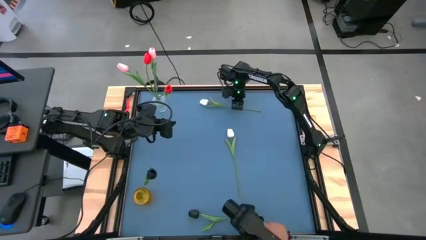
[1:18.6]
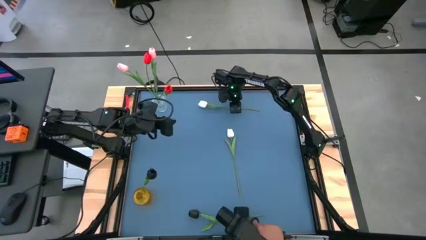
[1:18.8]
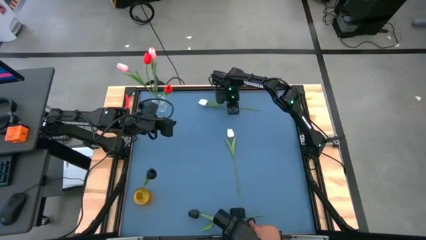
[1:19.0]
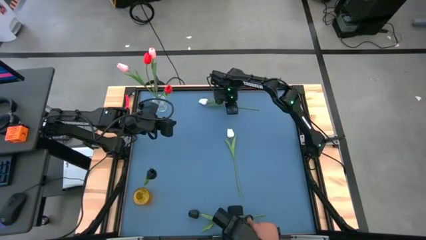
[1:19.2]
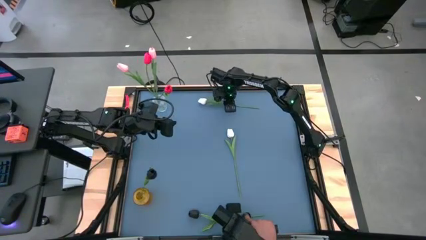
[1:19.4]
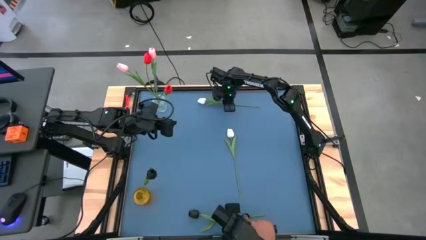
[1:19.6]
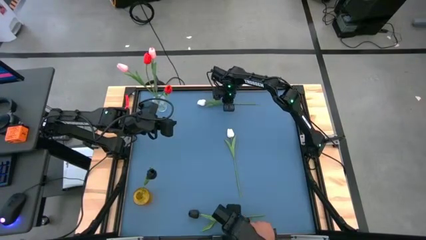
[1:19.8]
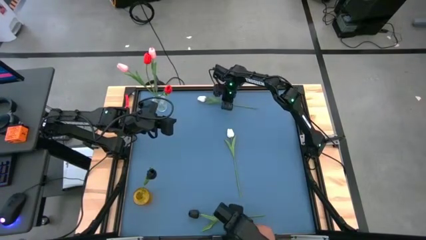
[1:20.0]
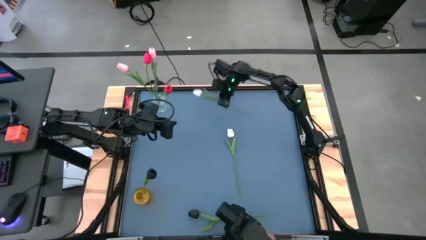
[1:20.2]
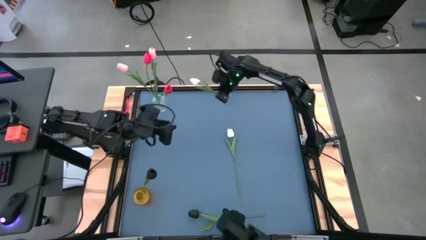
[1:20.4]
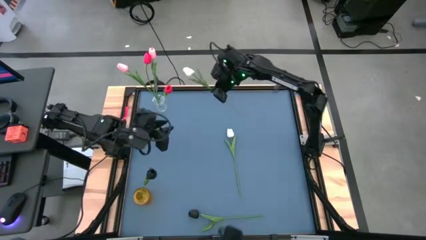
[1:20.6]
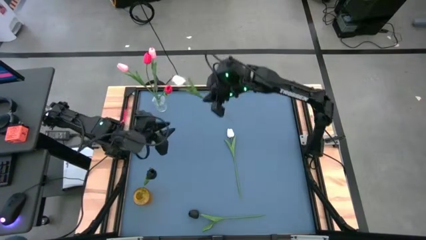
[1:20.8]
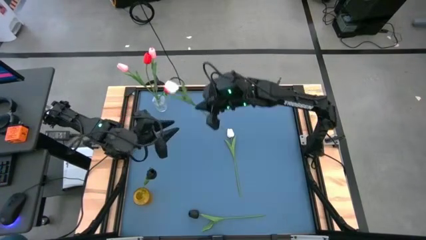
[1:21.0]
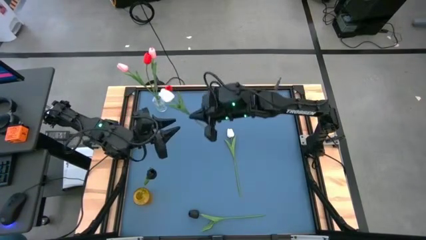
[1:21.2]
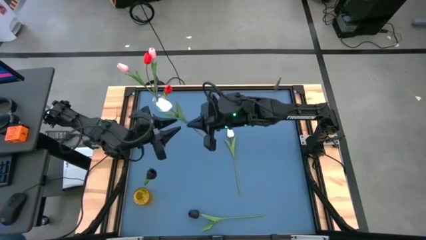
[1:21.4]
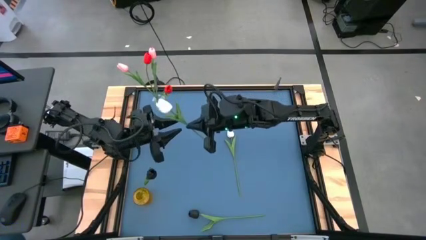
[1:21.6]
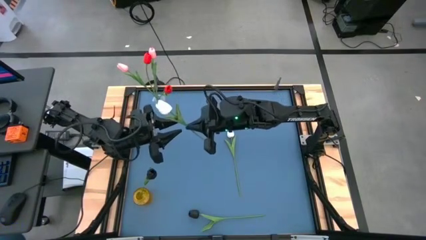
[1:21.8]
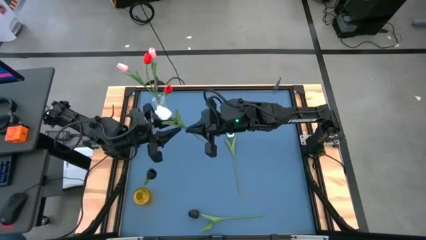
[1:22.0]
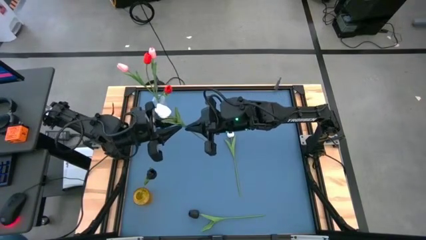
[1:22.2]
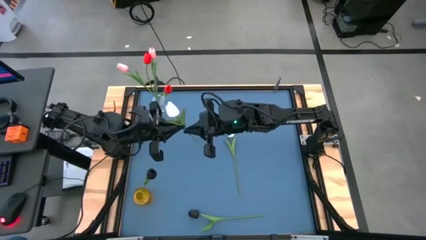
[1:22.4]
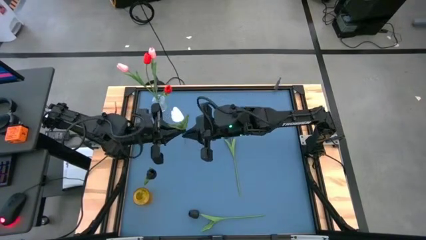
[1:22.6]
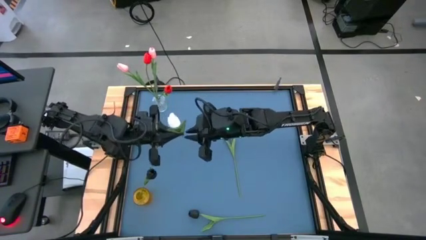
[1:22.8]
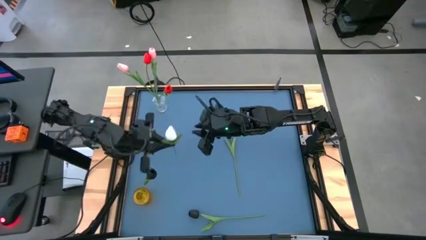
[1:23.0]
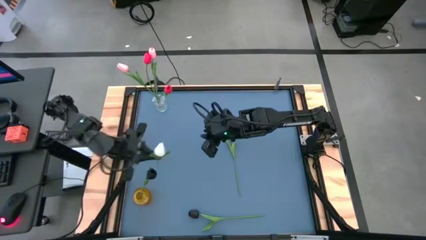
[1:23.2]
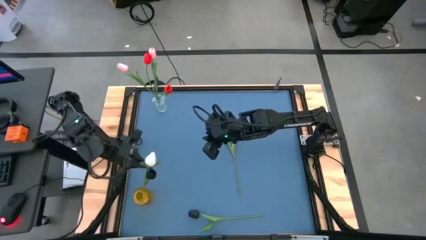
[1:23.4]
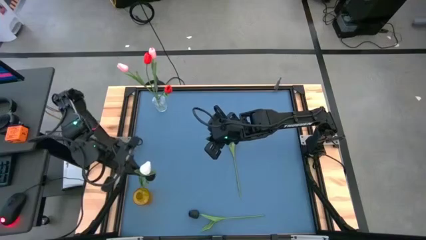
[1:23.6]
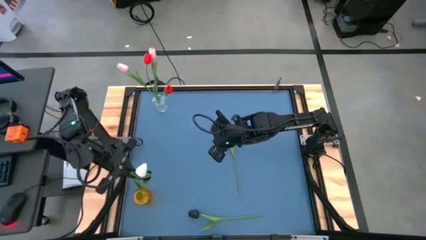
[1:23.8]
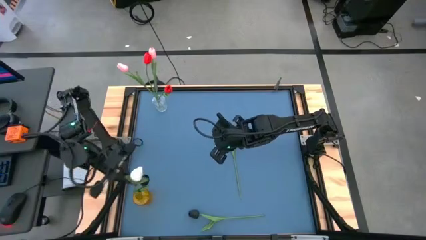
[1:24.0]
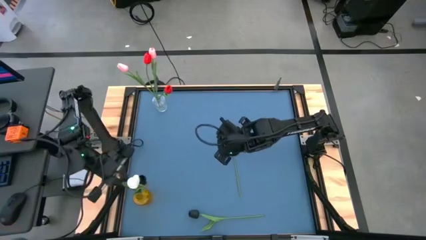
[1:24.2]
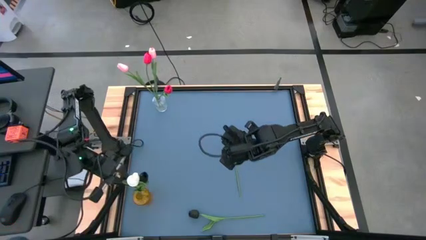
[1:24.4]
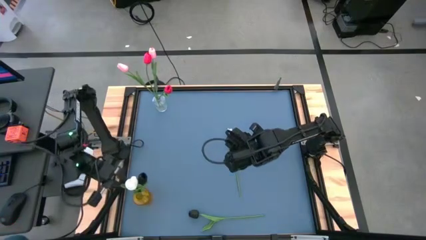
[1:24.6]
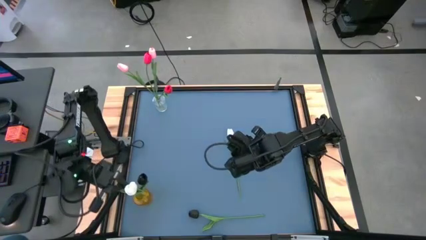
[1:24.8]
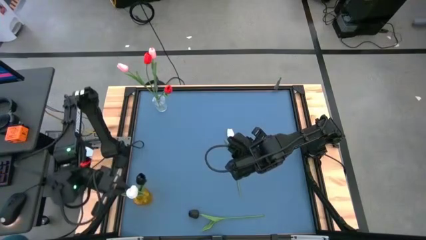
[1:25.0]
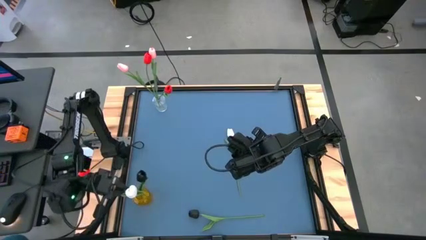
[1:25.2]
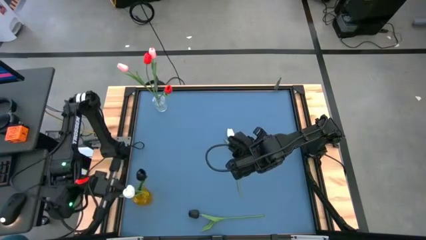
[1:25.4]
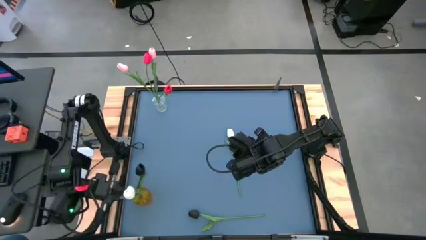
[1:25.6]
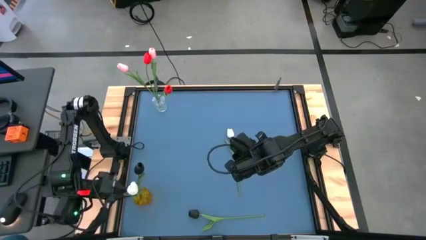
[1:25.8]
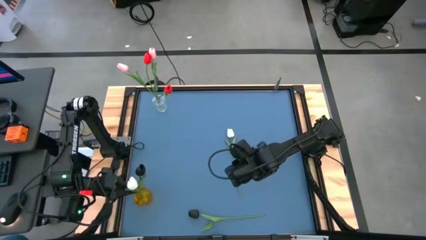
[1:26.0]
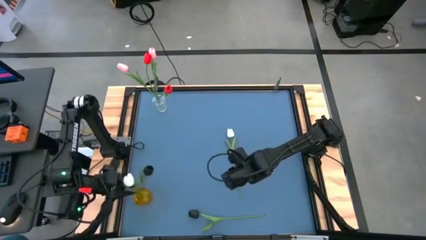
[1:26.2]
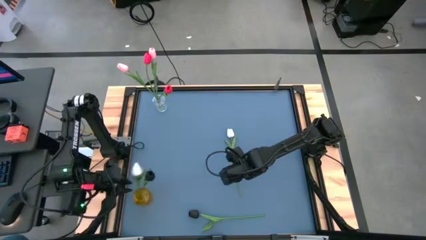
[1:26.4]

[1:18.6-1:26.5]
Task: Sort flowers into vase by color
Put the top white tulip into the yellow vase

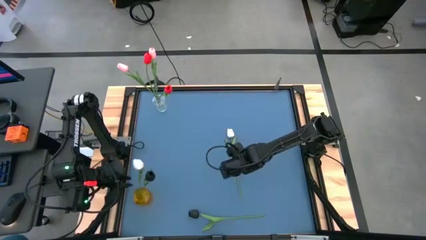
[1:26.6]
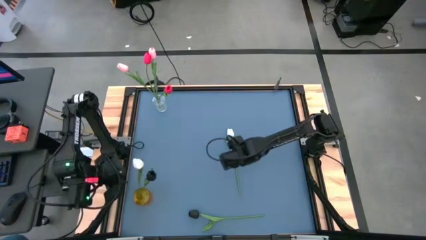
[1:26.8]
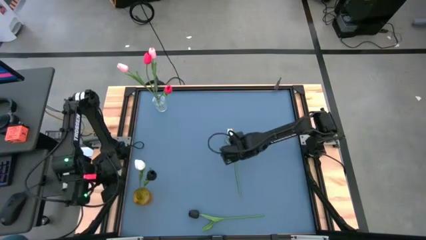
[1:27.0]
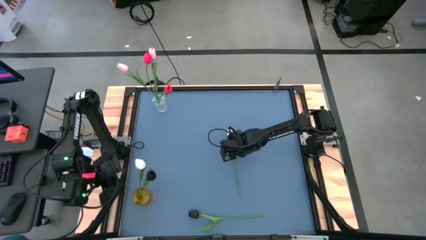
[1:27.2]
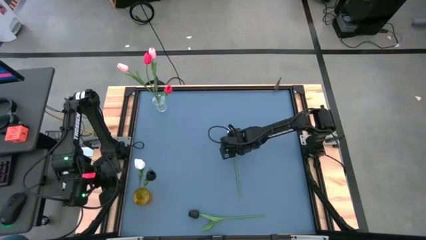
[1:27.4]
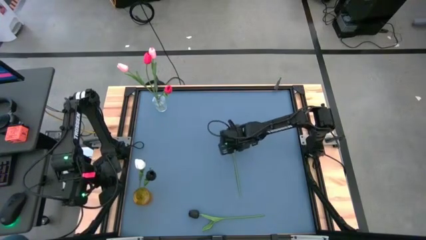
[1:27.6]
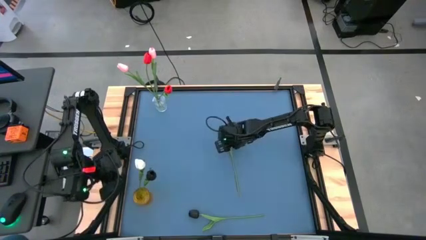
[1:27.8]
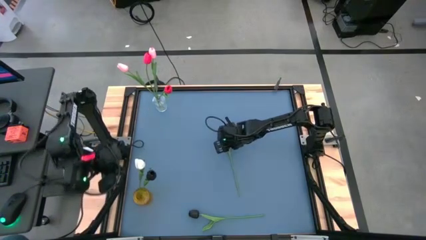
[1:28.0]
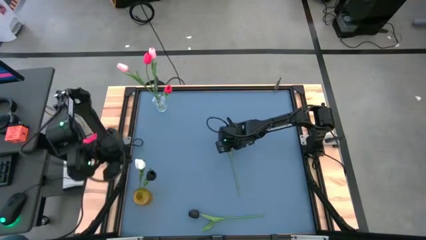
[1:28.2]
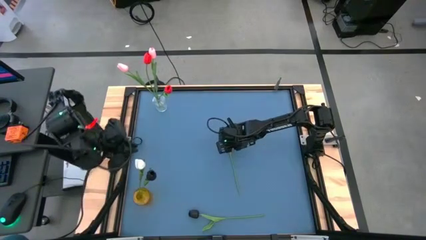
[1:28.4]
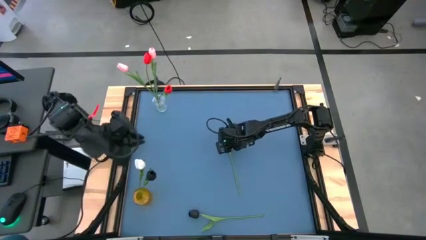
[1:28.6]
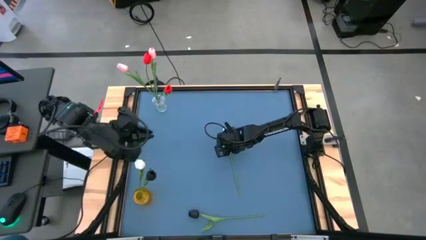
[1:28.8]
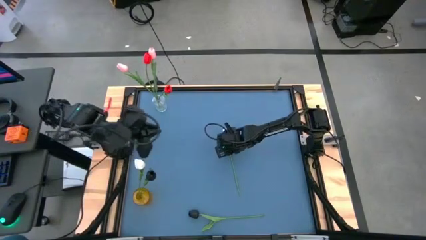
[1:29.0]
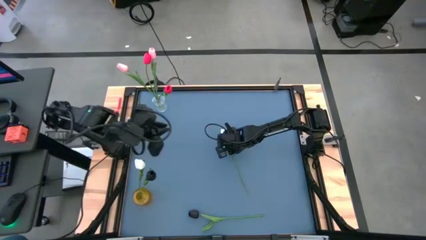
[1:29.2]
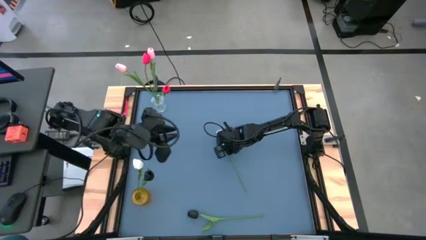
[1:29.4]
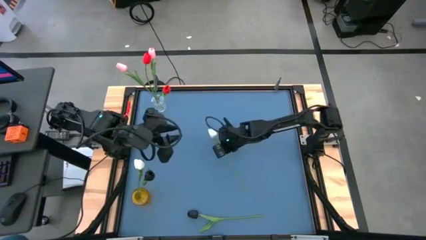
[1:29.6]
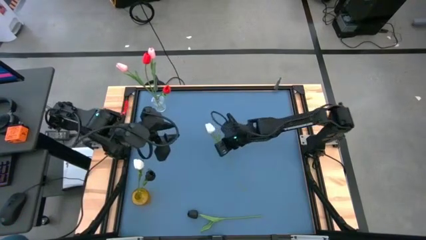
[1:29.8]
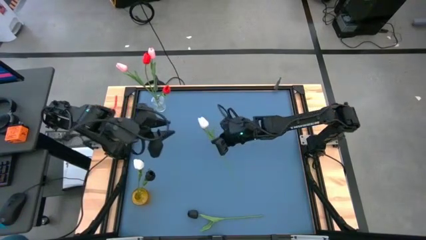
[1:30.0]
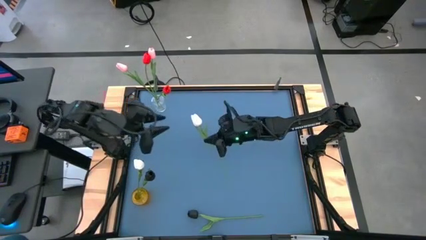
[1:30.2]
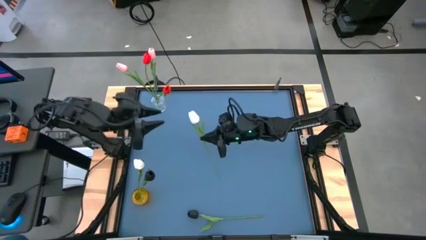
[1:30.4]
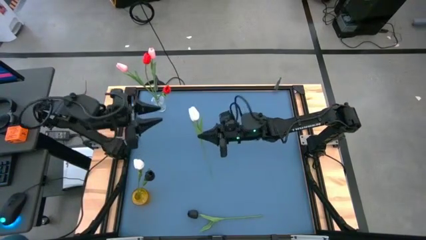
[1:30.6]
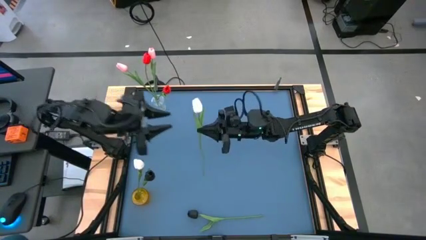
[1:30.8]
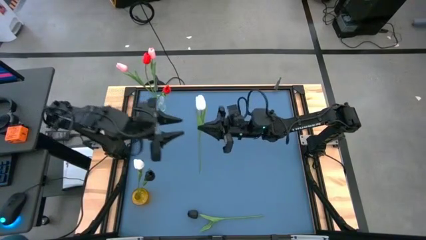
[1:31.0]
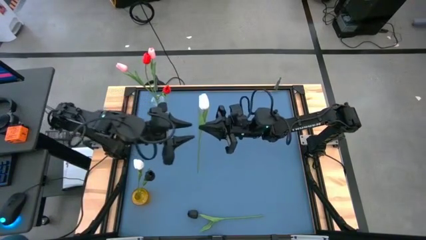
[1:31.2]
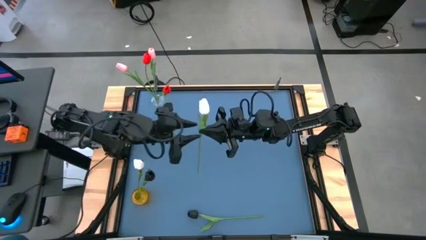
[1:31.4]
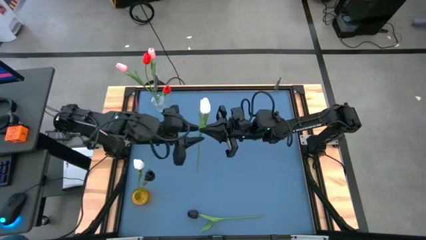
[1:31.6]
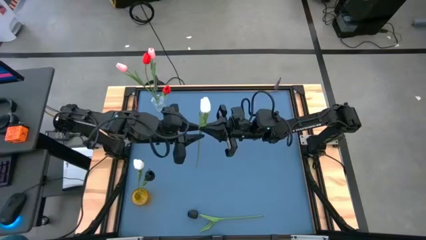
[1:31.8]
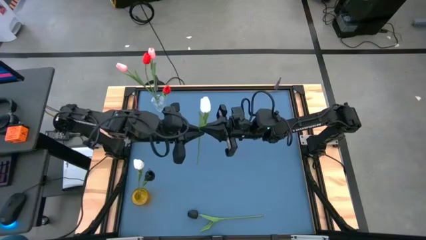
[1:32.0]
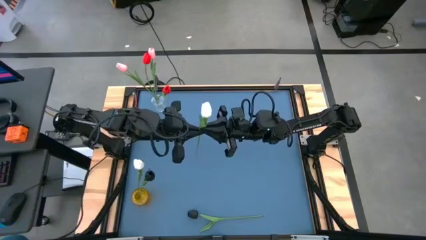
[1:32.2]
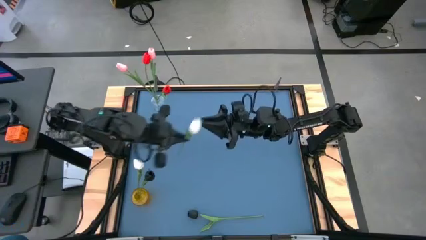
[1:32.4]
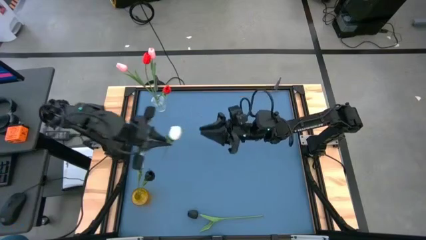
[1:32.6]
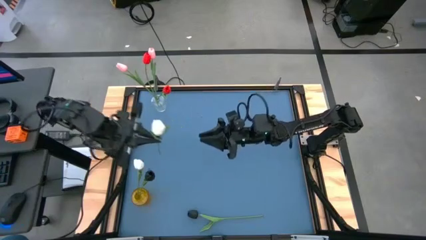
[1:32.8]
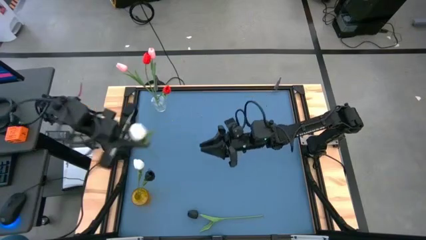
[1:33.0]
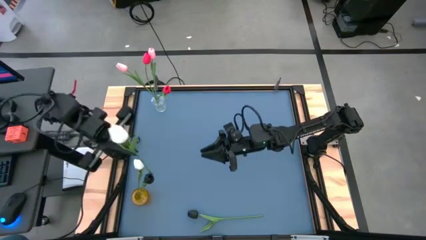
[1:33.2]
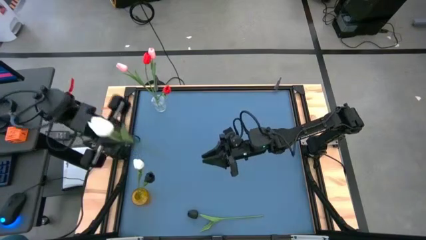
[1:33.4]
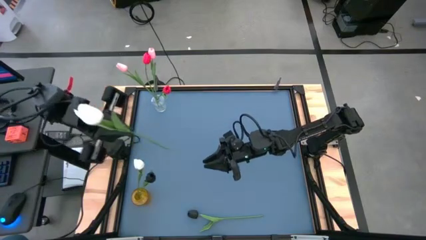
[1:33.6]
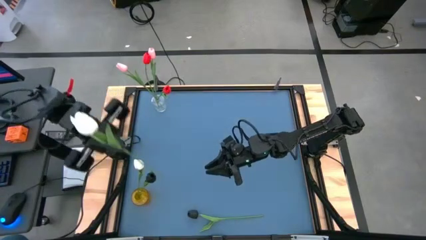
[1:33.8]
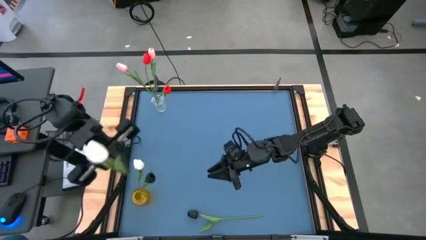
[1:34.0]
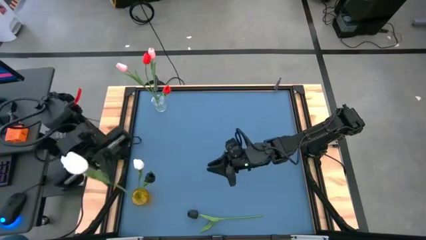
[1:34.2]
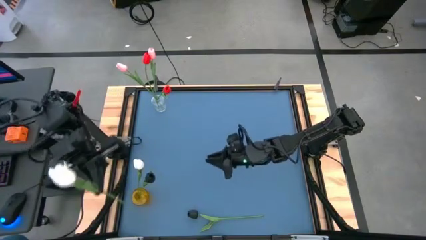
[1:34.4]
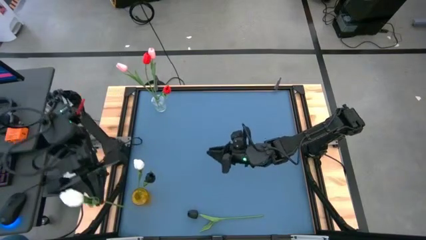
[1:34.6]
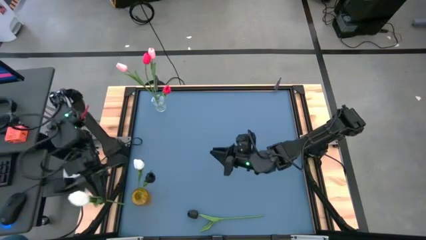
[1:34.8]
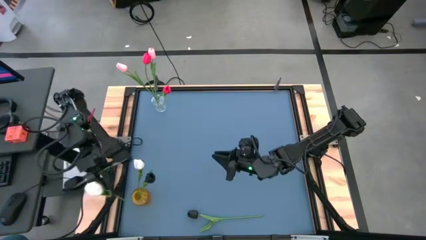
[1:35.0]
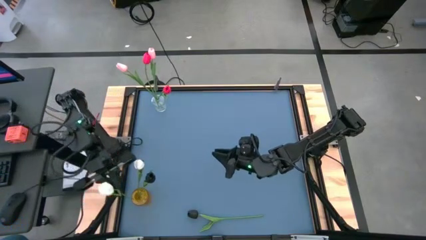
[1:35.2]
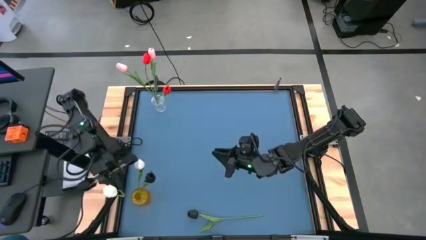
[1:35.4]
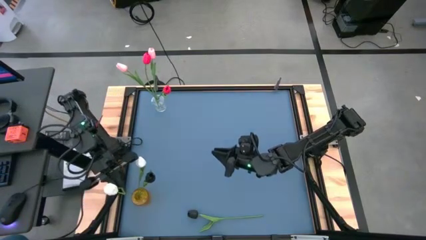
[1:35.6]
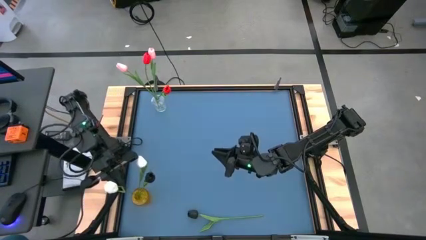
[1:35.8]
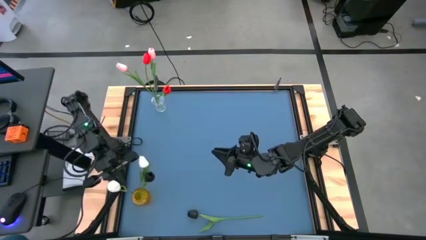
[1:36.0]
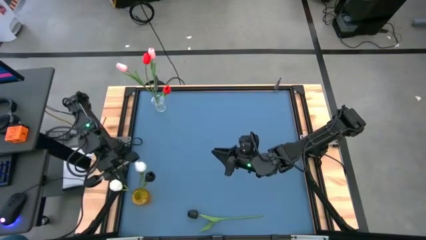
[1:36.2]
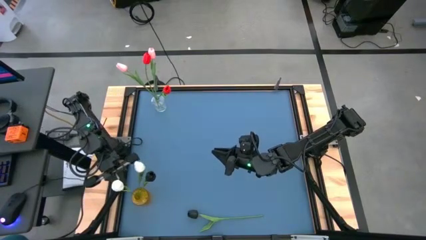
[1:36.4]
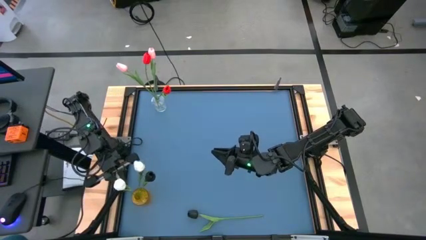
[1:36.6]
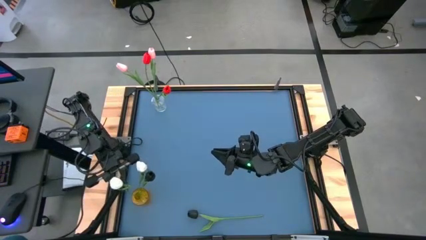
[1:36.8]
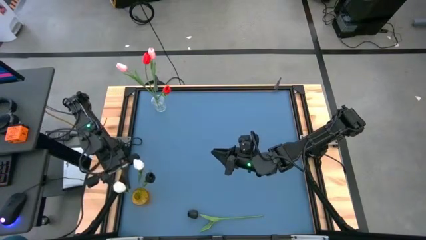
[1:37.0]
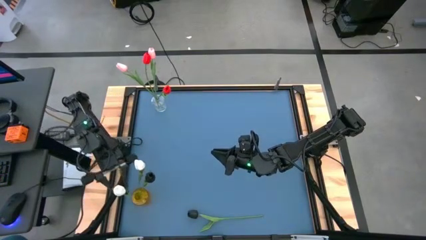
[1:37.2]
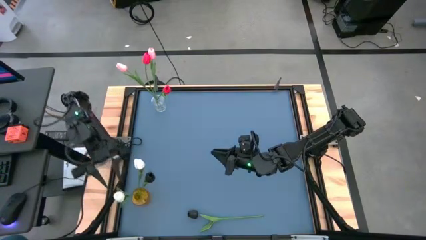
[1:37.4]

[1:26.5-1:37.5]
Put the white tulip into the yellow vase
